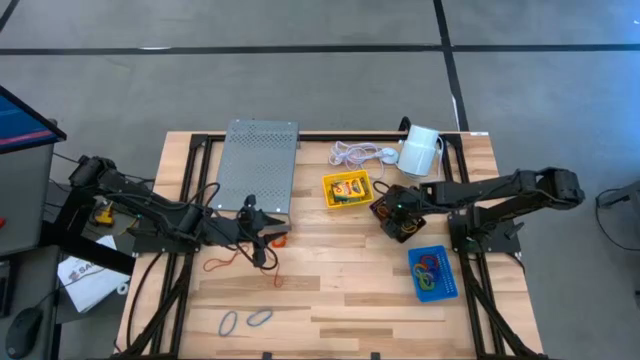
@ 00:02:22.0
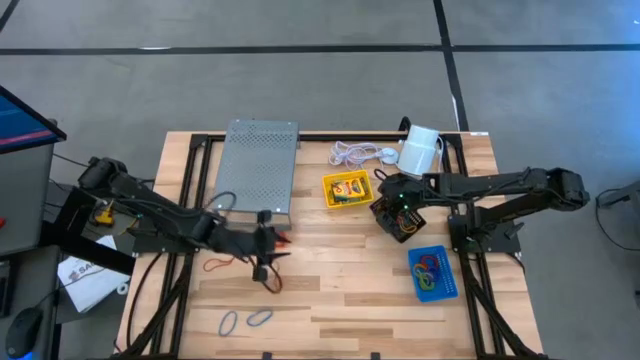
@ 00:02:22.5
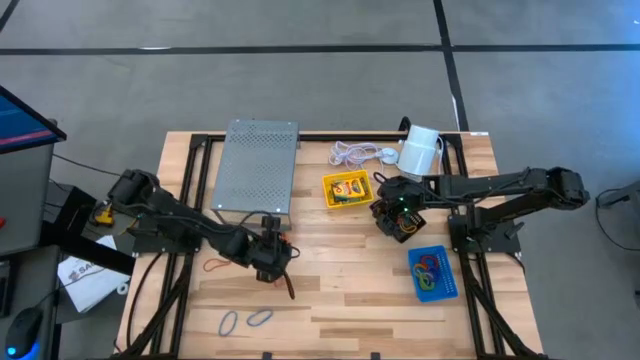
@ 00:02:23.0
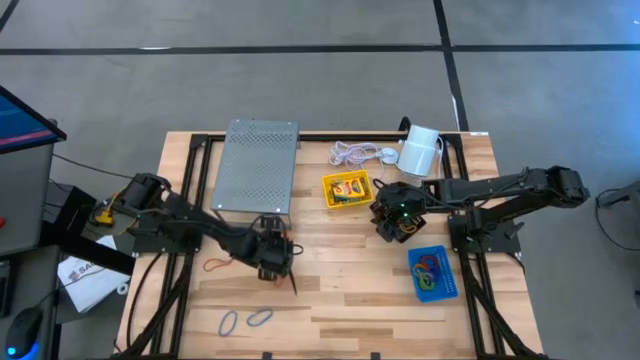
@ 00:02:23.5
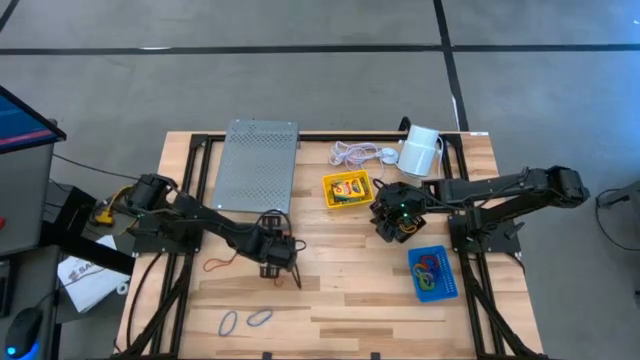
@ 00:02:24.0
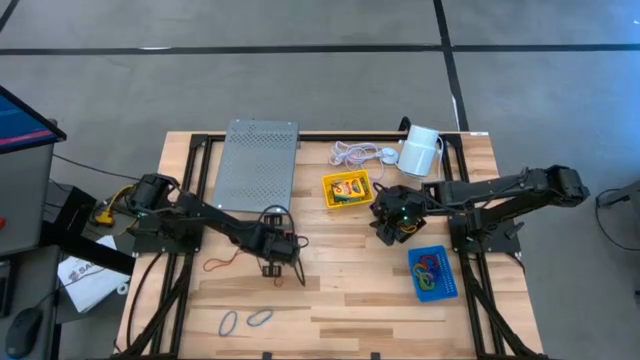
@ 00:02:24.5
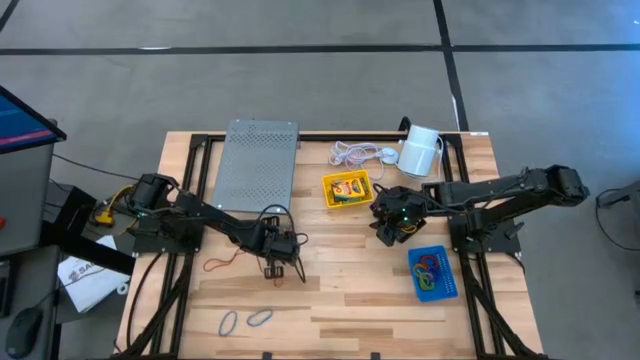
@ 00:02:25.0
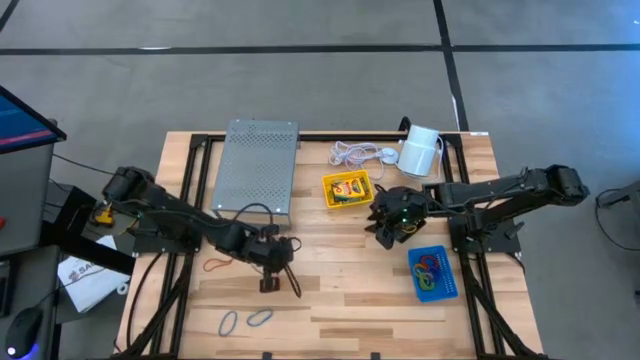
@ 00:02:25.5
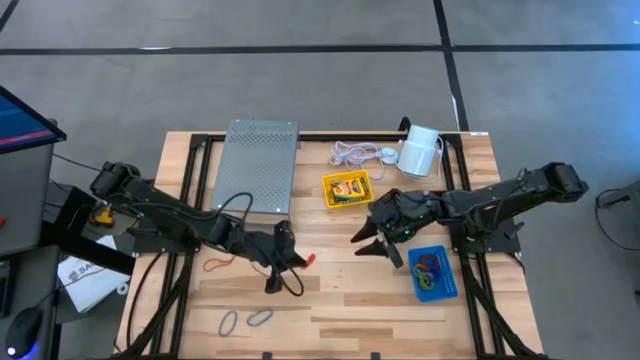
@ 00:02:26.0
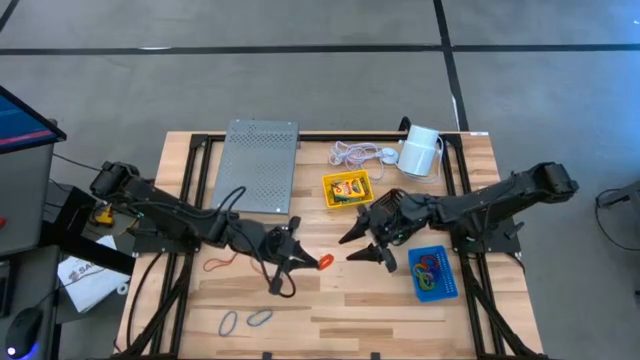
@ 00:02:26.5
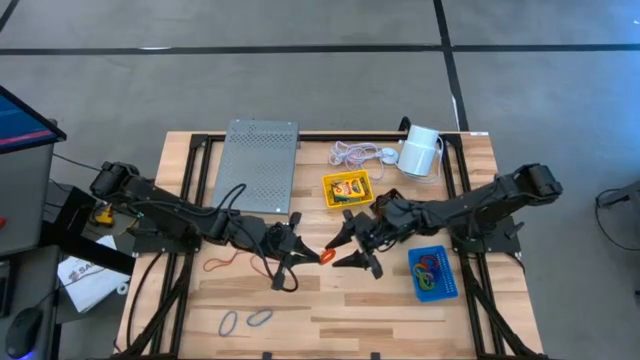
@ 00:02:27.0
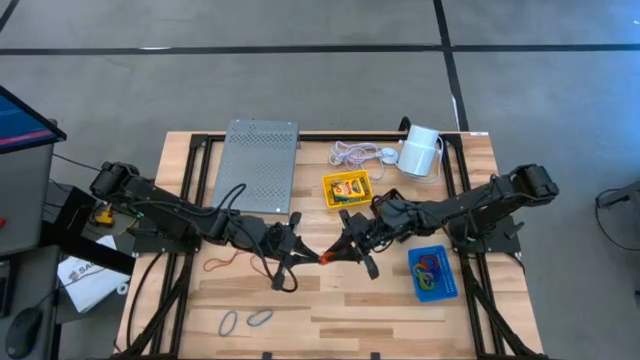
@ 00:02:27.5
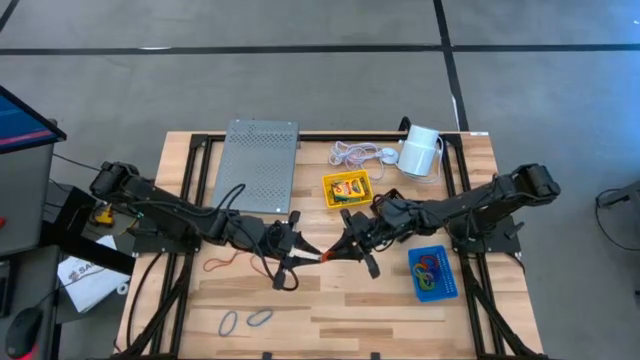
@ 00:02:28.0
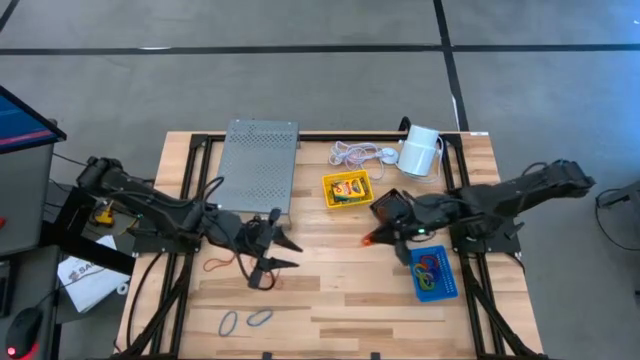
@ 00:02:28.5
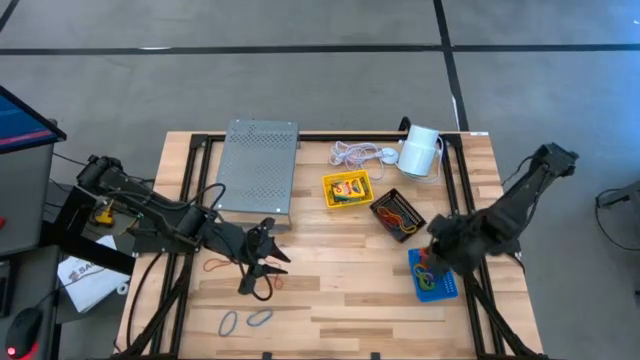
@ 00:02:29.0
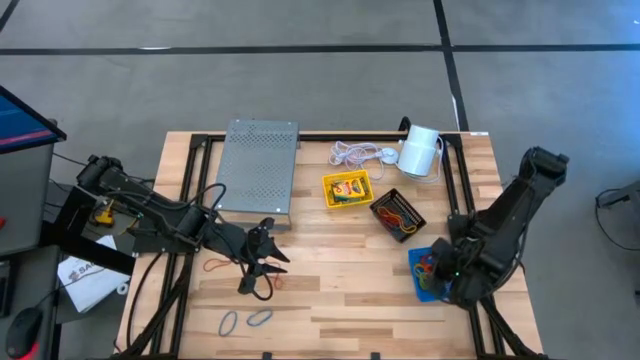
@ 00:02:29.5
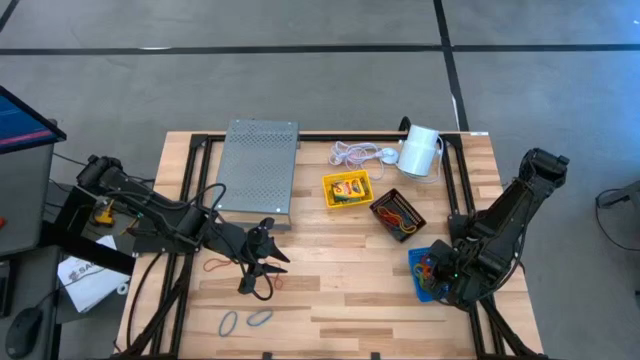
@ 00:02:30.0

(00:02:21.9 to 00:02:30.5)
Task: Pick & Place Office Desk Supplies
Put the orange spring keychain into the blue bin

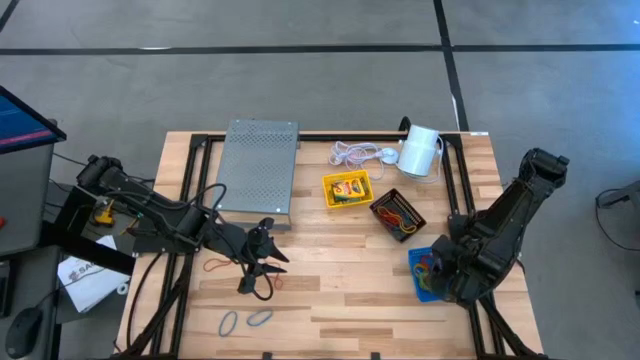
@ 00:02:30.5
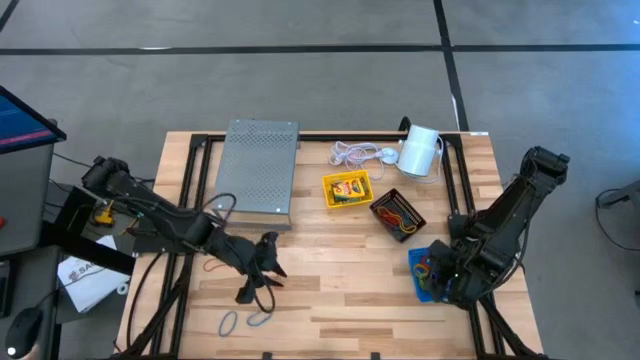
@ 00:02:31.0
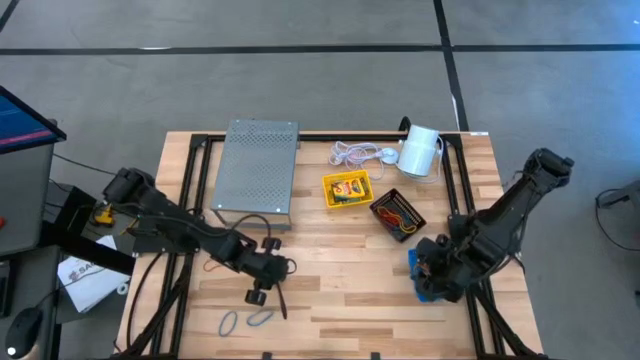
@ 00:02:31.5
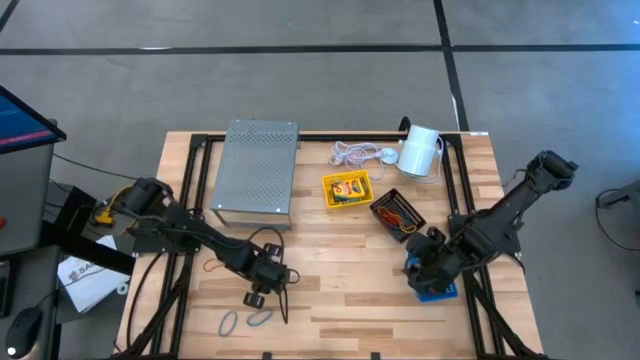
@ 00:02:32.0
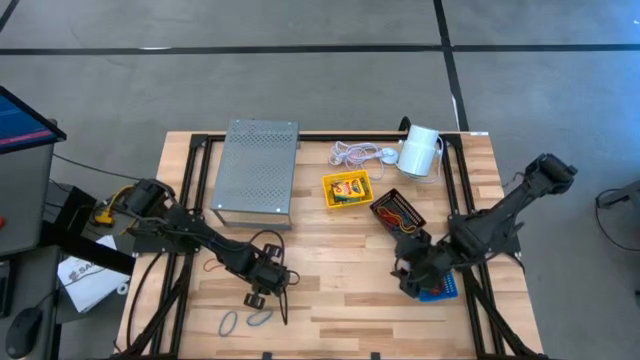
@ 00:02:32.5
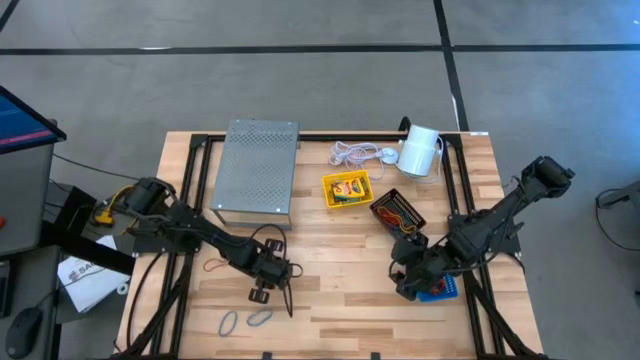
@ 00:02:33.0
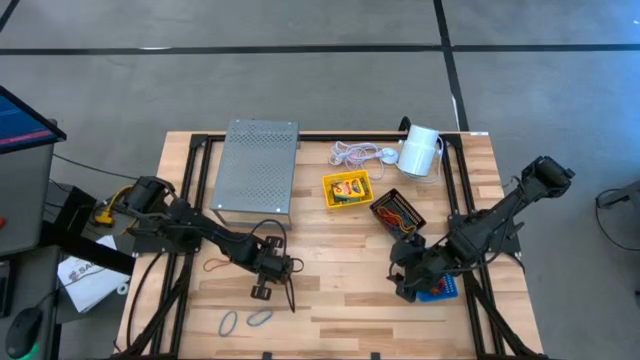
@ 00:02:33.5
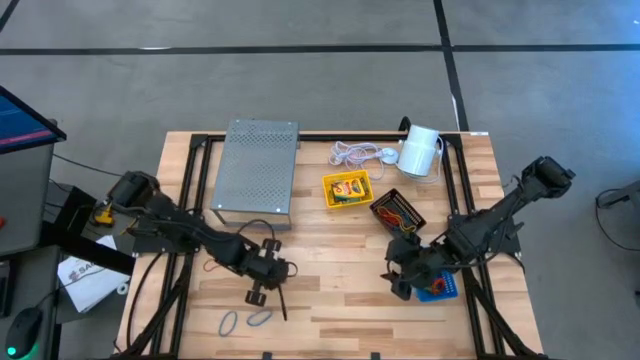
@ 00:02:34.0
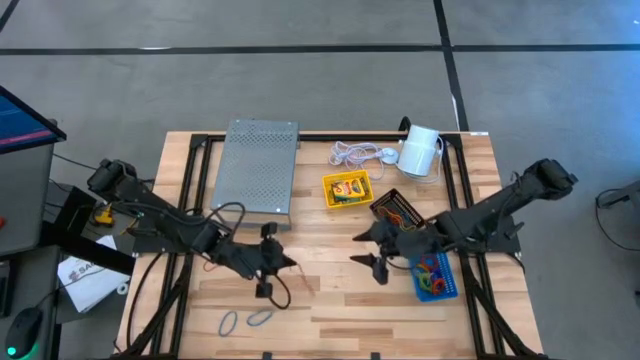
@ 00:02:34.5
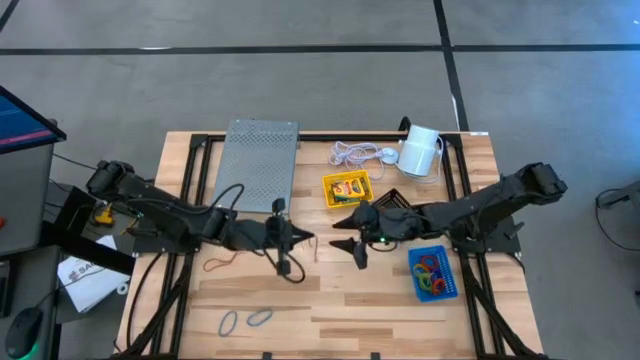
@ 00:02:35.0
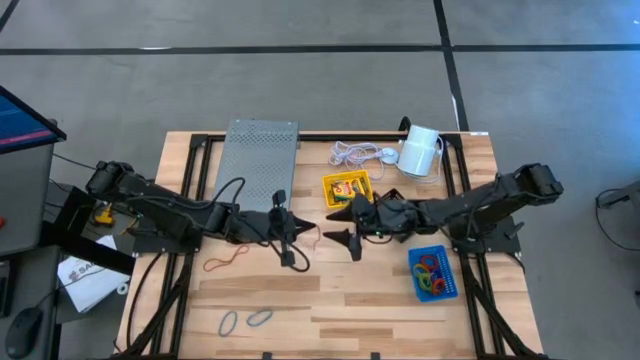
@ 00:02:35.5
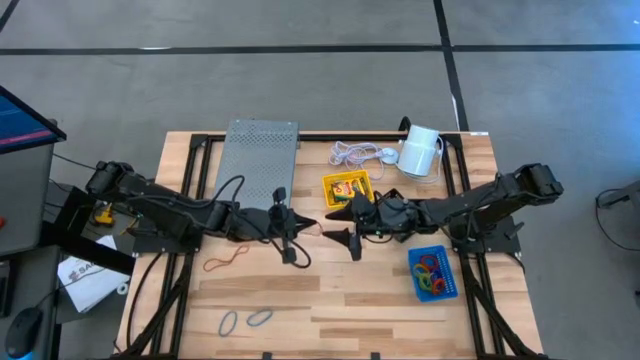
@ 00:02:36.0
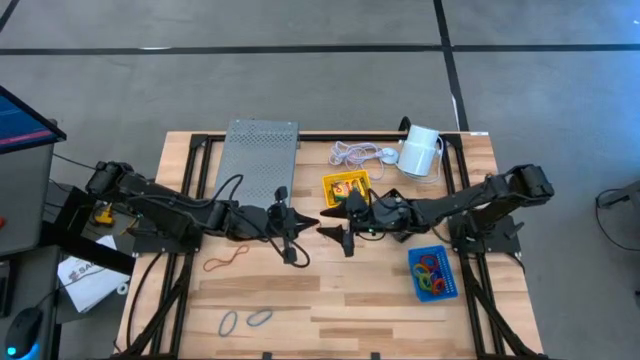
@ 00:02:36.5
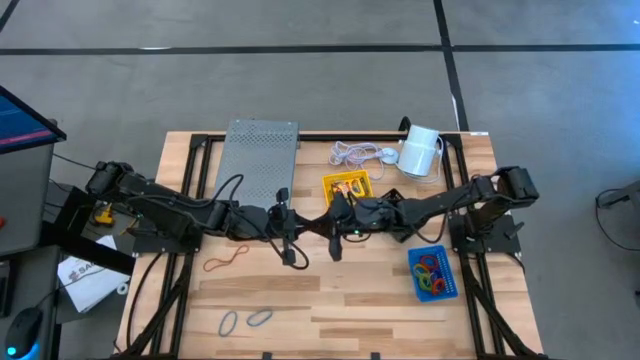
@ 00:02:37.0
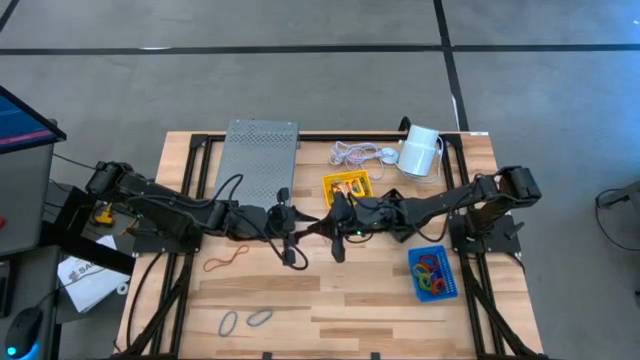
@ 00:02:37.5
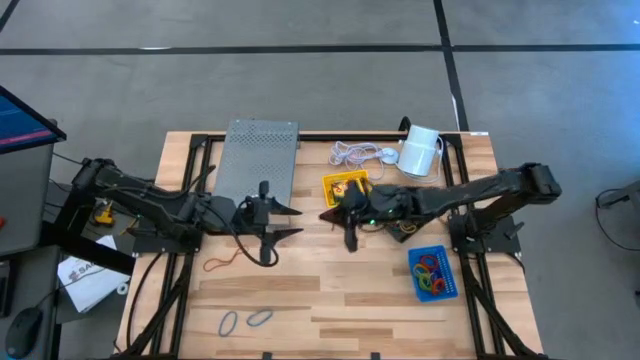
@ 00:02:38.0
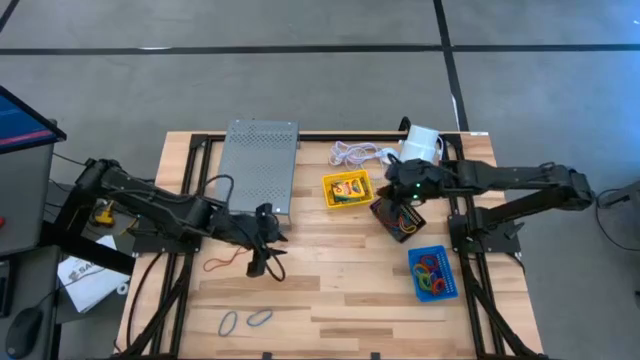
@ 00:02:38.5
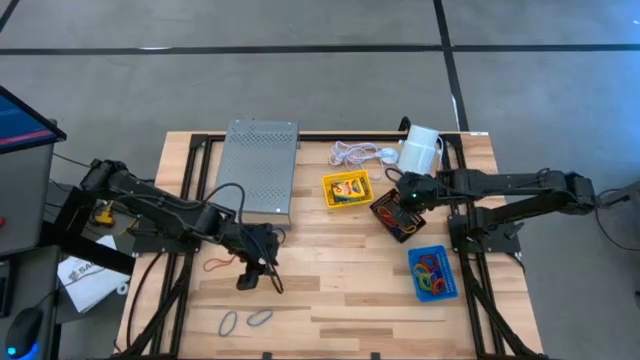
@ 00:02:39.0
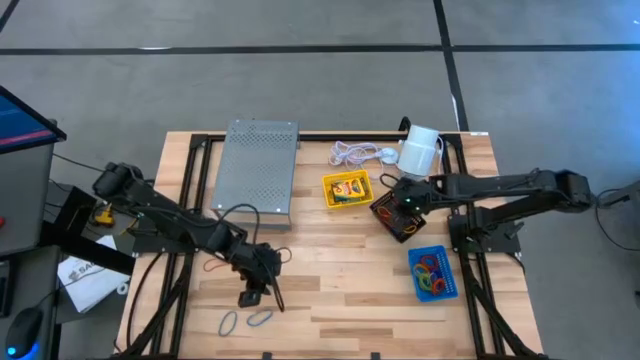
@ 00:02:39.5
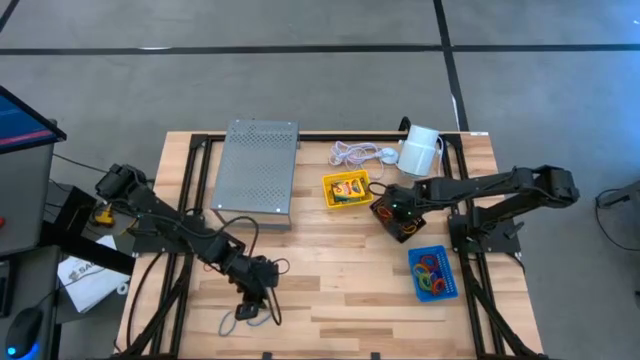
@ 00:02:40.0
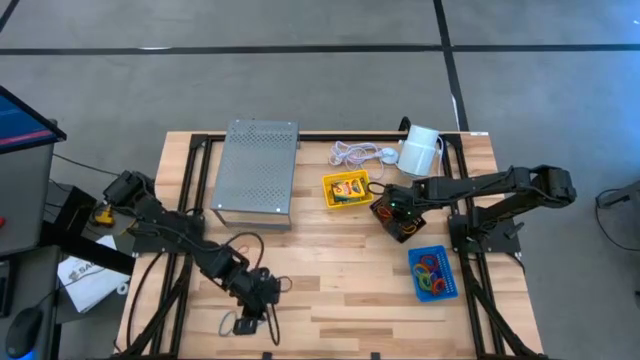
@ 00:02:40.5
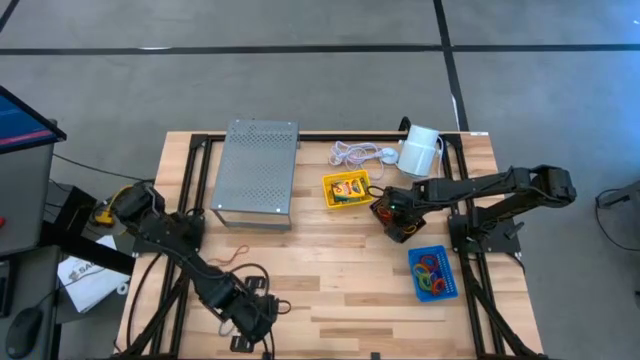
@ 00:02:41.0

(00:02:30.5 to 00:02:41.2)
Put the red rubber band into the black bin
